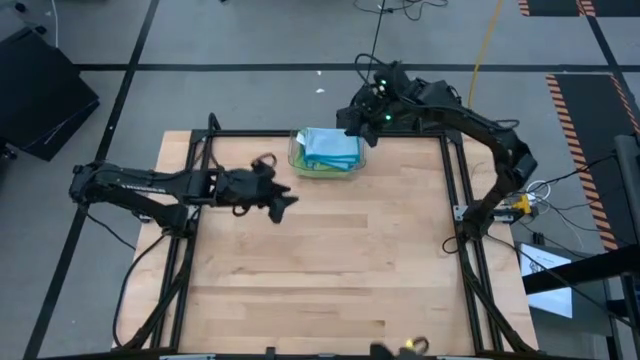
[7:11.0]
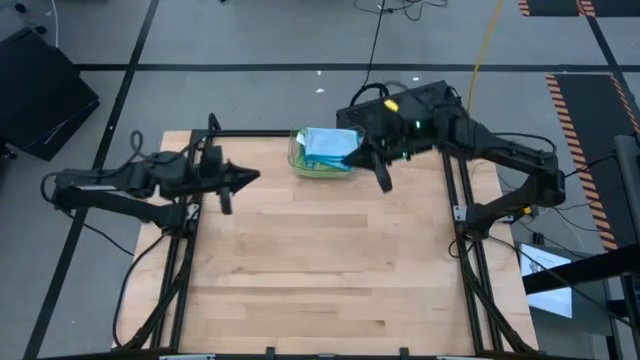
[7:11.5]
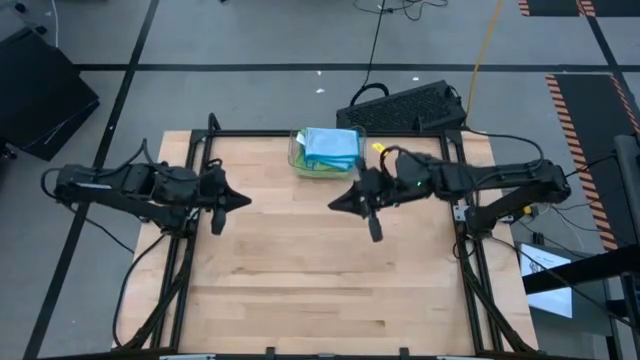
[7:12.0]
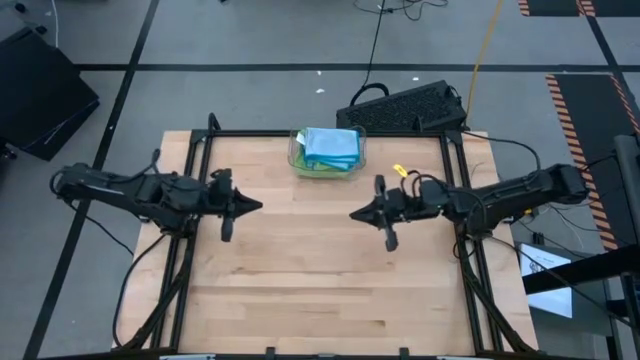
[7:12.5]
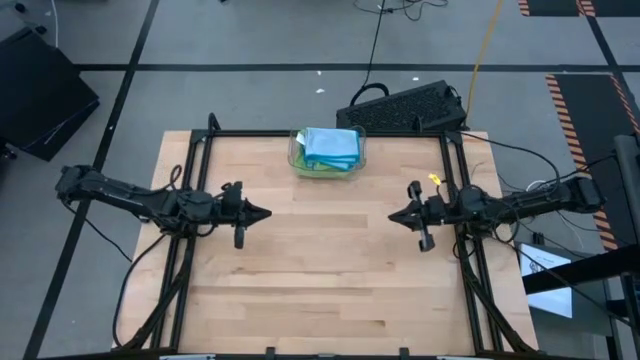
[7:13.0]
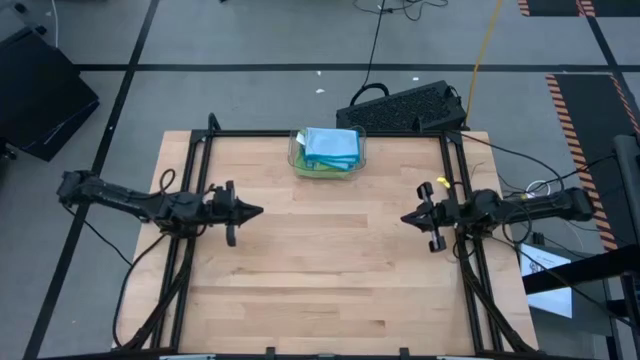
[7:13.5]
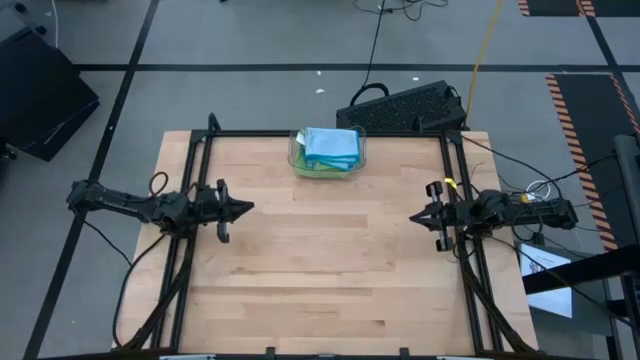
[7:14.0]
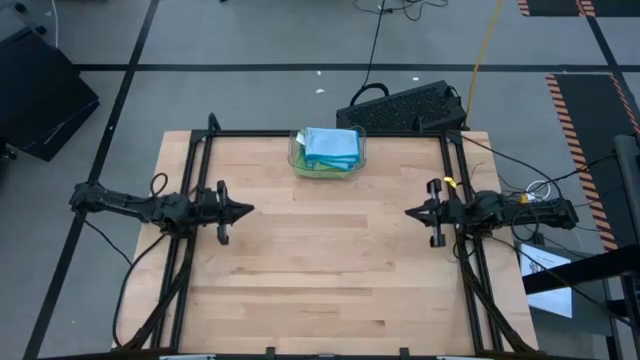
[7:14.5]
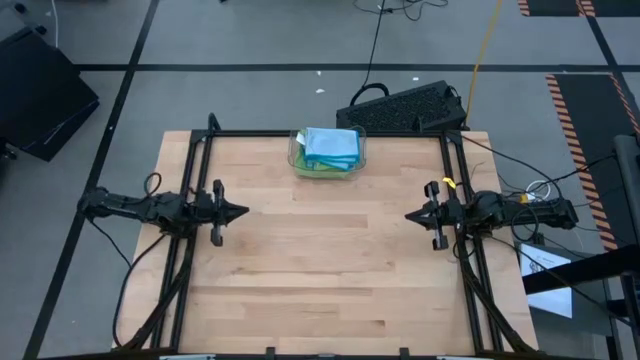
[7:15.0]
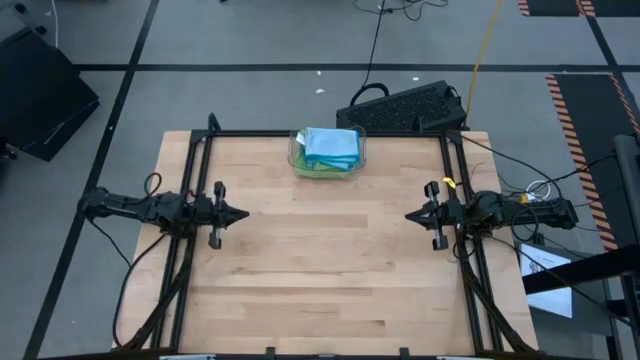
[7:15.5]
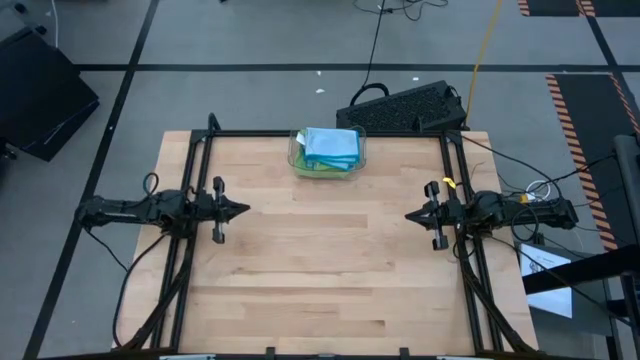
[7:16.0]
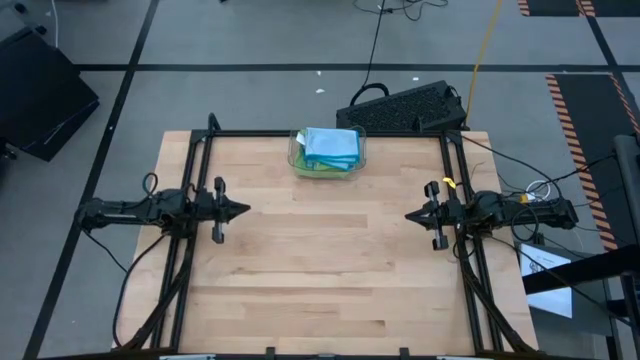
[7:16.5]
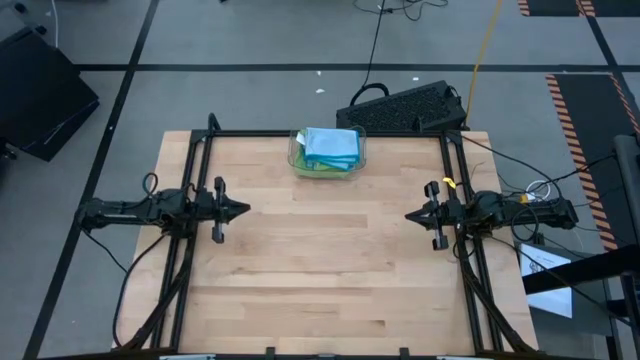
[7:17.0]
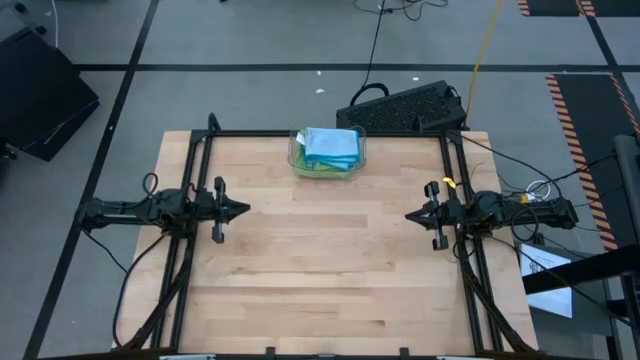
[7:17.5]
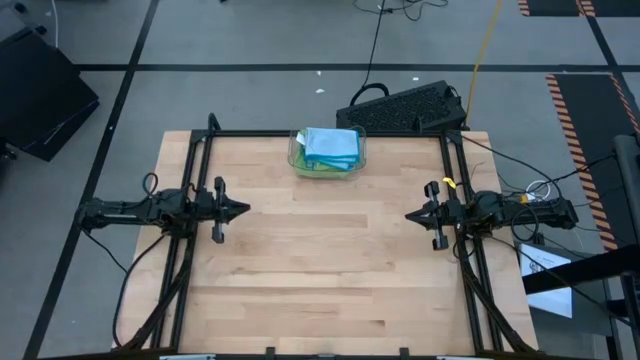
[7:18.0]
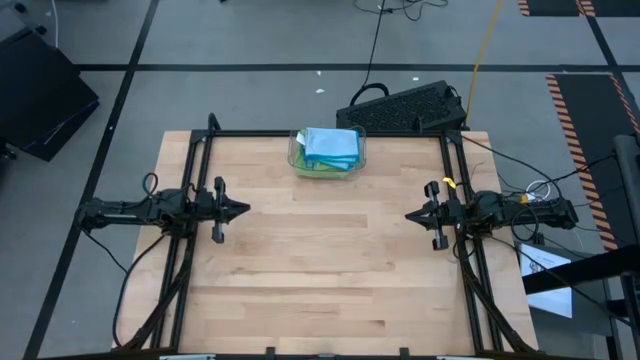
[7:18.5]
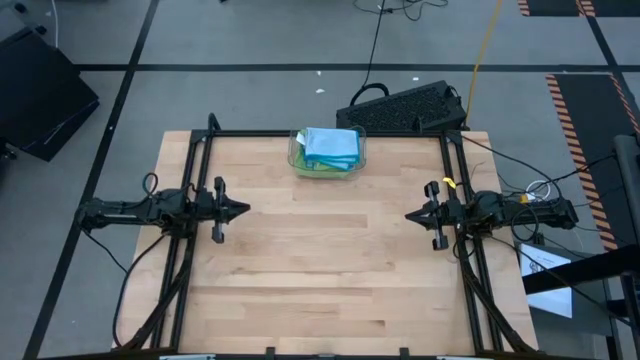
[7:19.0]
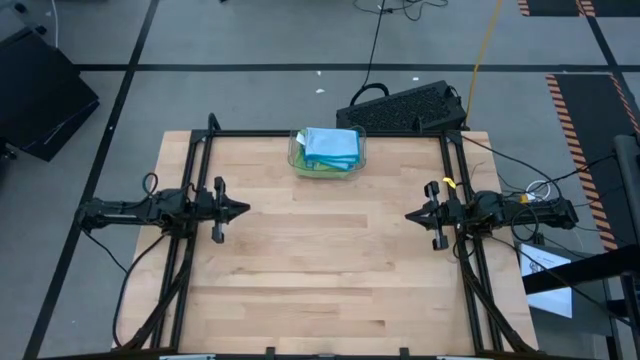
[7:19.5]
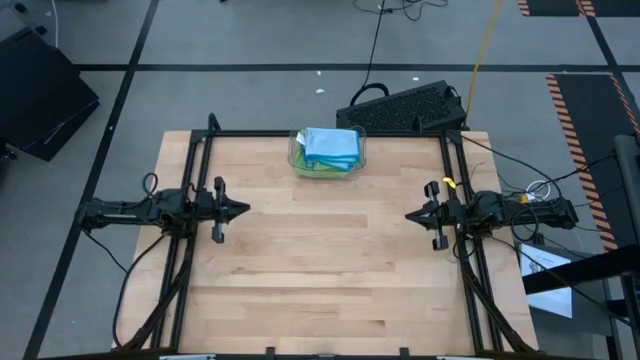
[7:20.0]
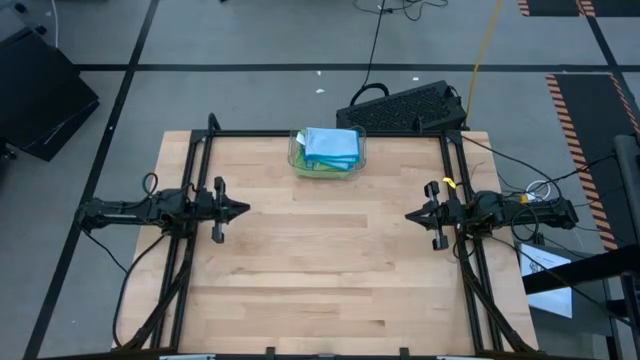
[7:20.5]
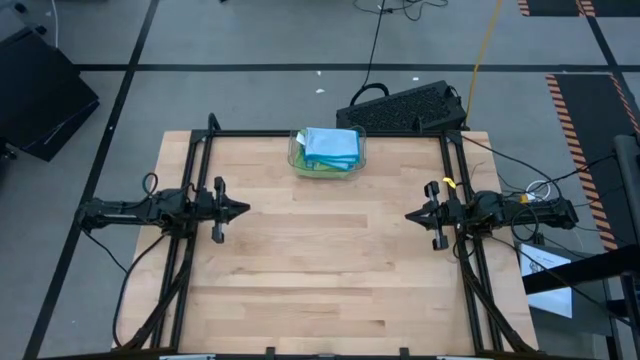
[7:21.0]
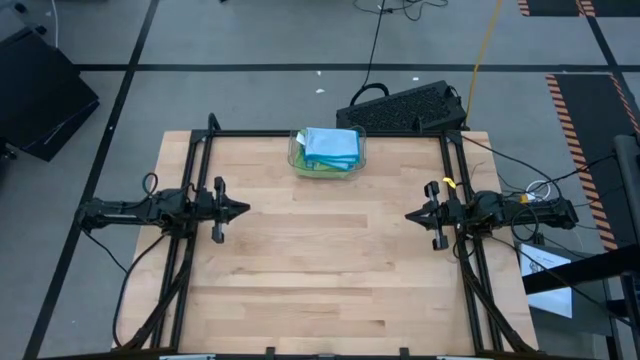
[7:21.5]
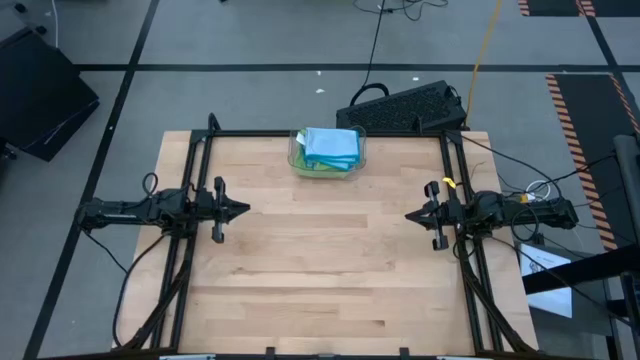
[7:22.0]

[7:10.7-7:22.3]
Task: Fold microfiber towels
Return to Home Position

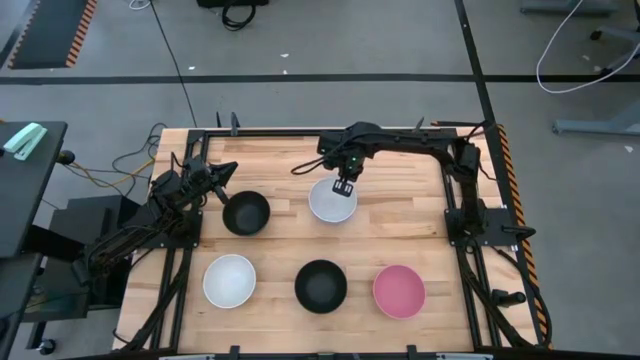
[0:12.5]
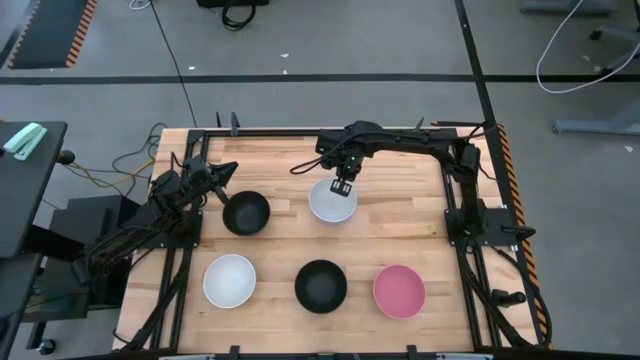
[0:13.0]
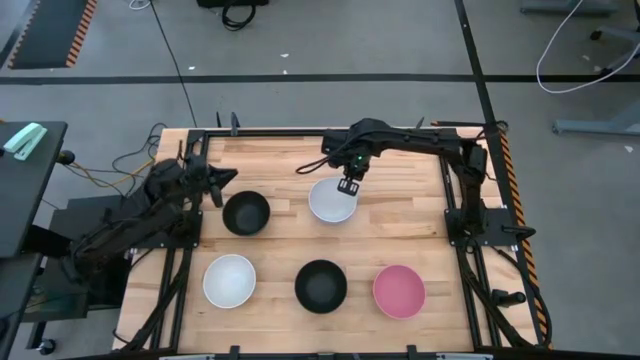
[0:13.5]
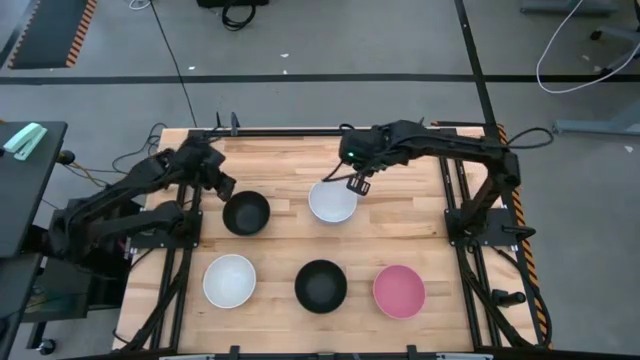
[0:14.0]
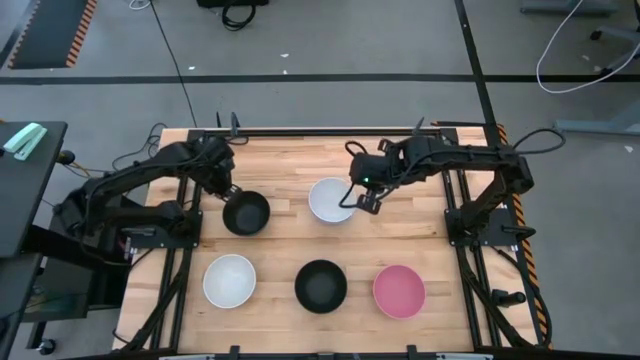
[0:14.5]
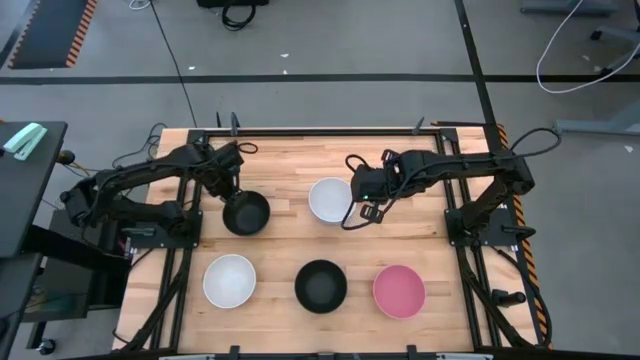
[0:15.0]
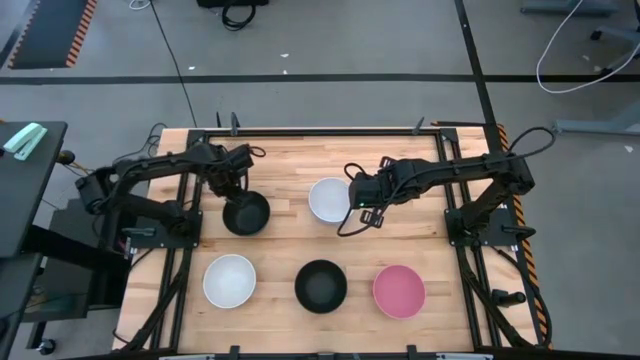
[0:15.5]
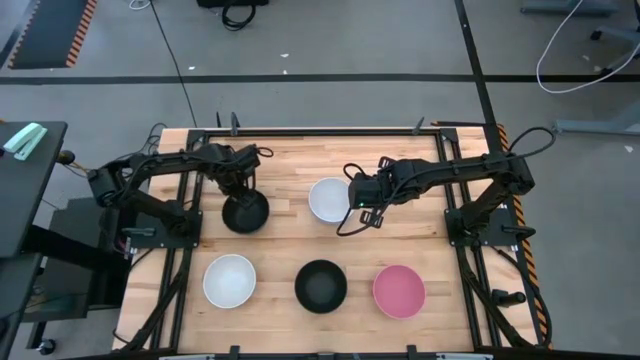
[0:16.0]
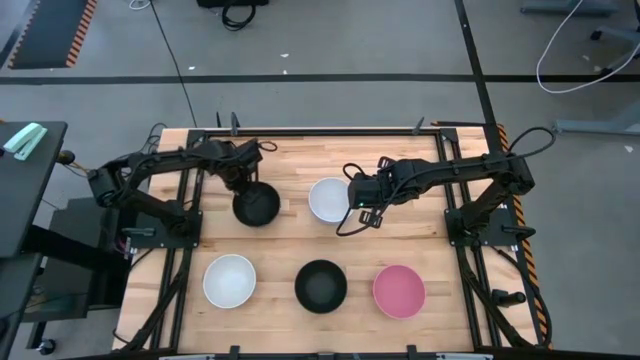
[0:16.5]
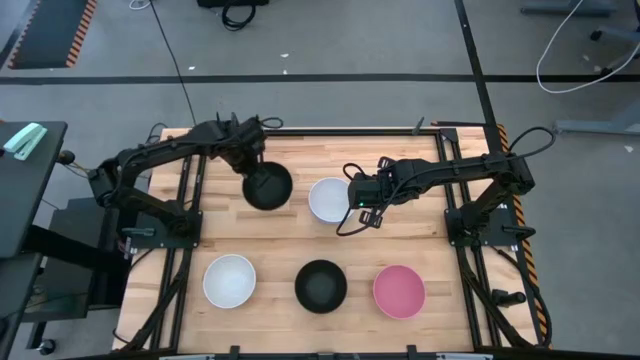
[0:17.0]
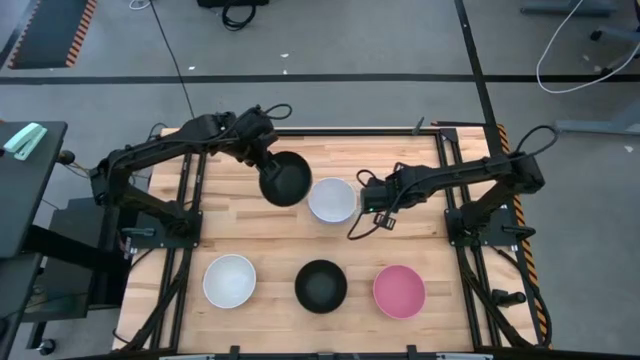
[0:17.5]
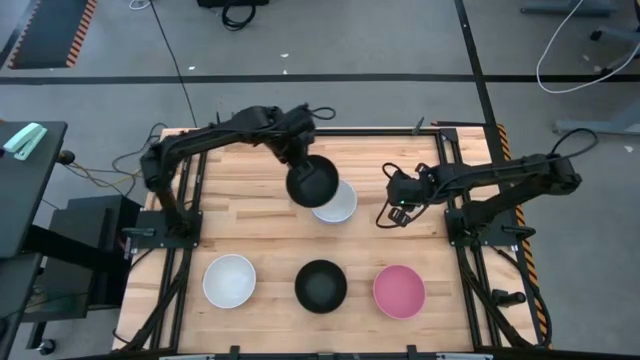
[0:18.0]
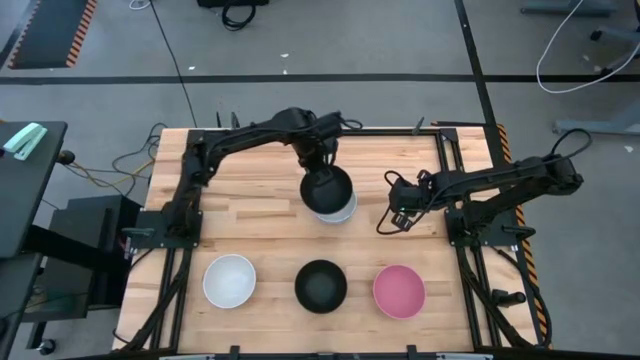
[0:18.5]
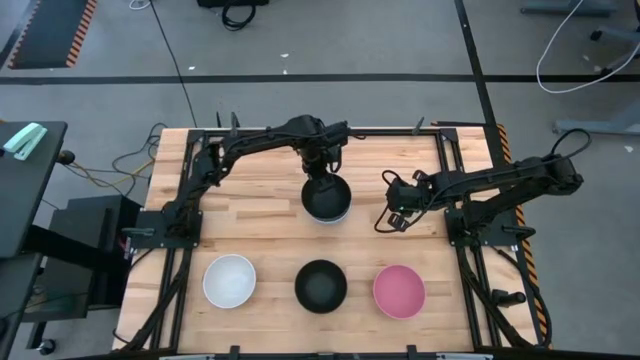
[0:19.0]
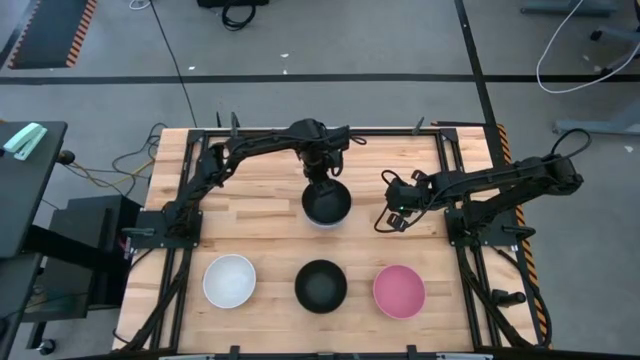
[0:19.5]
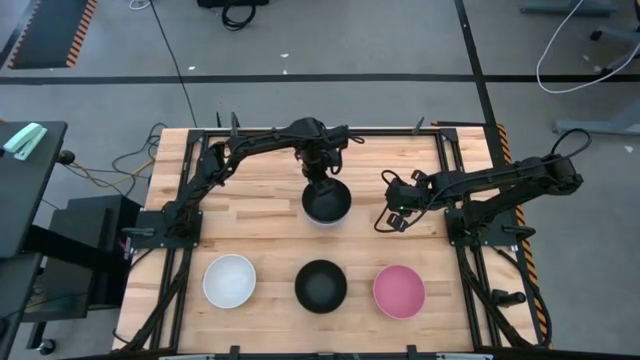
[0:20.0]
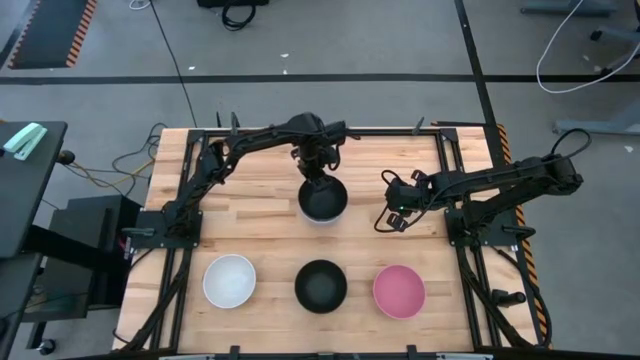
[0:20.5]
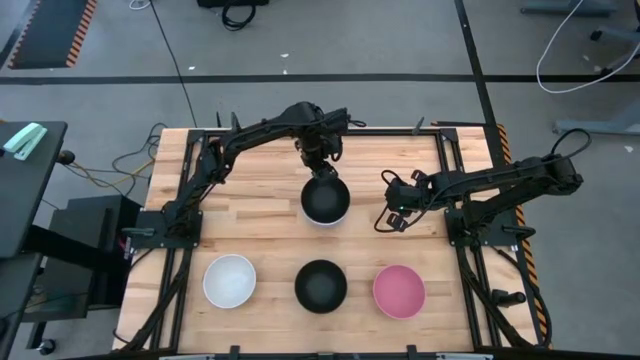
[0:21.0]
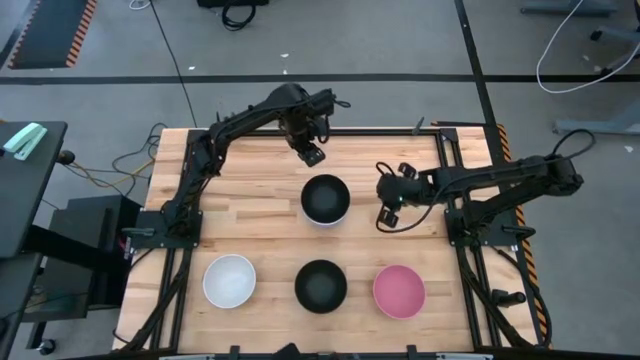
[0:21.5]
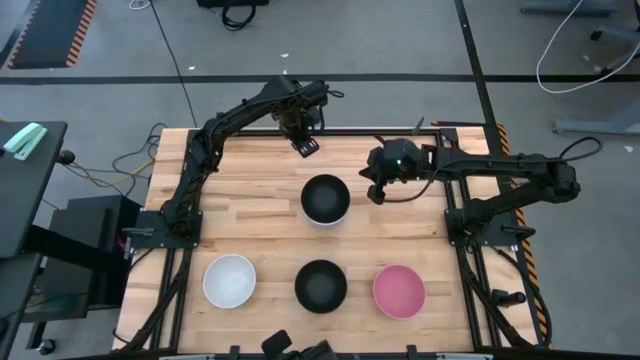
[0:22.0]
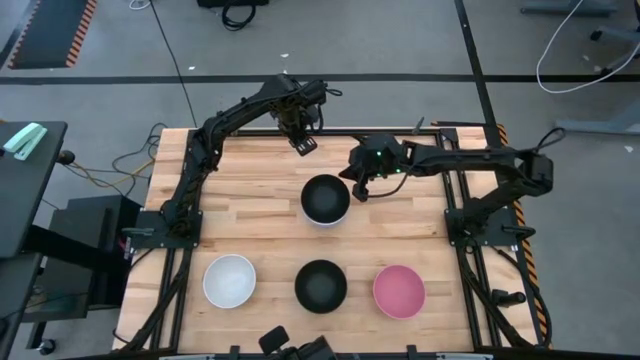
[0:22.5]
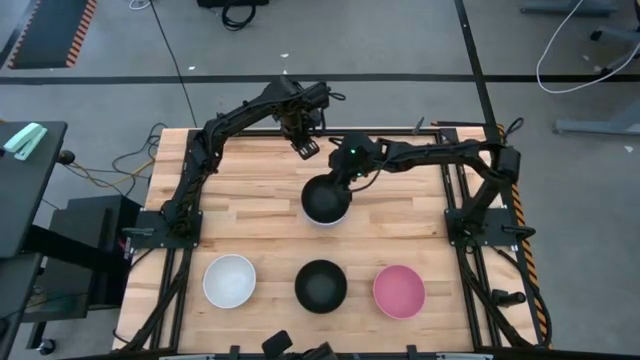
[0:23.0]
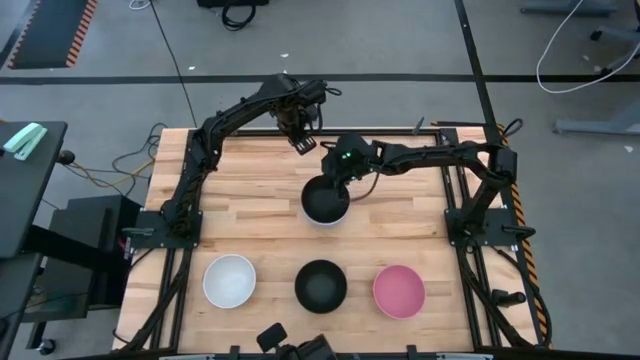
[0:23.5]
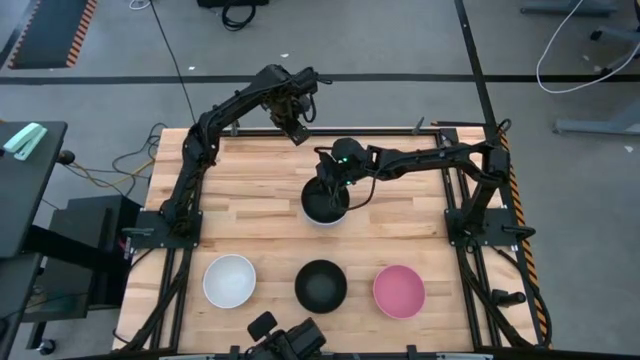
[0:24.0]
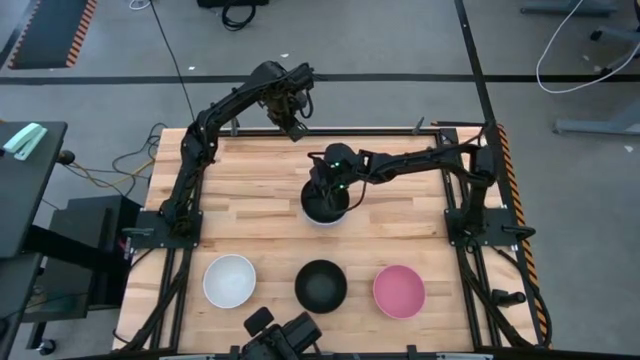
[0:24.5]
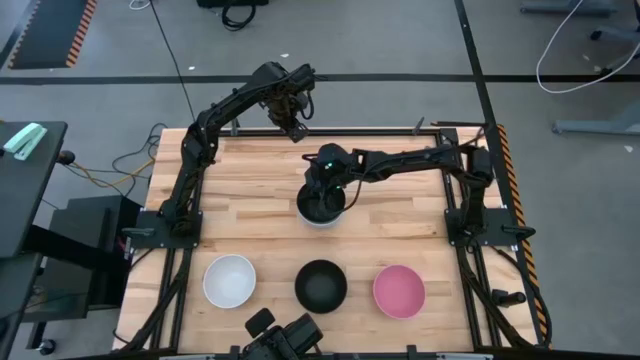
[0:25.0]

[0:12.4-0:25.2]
Task: Nest bowls inside each other
Stack the top black bowl on top of the white bowl
